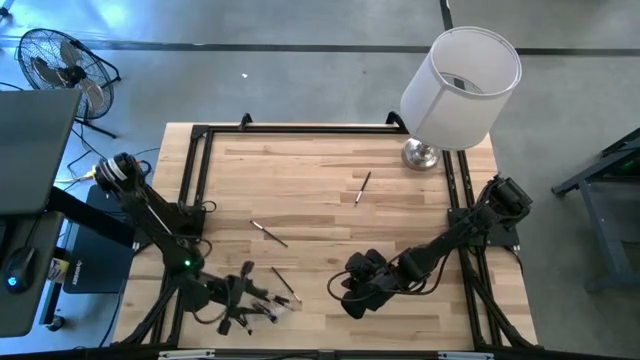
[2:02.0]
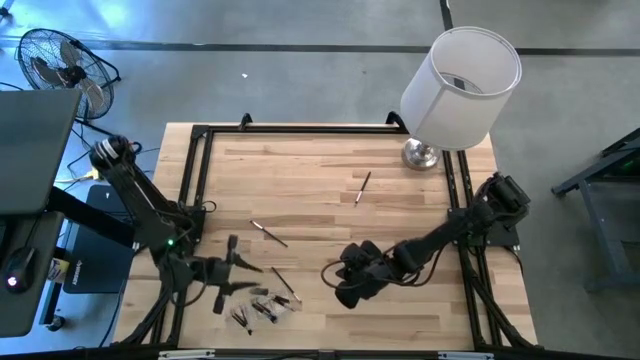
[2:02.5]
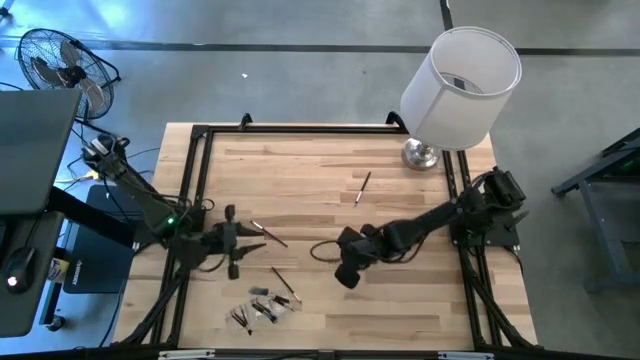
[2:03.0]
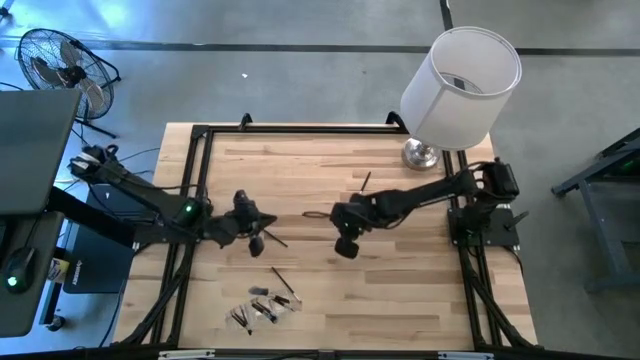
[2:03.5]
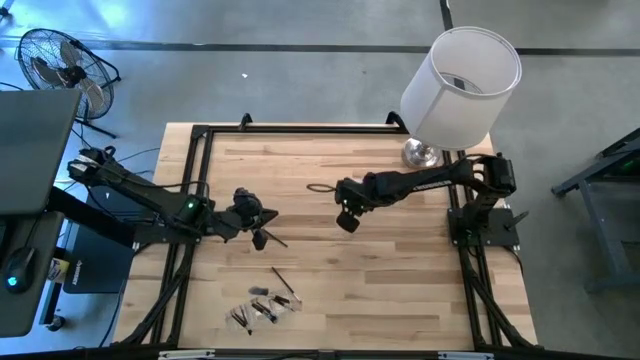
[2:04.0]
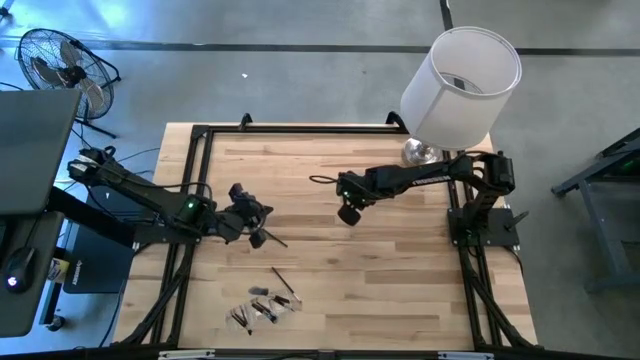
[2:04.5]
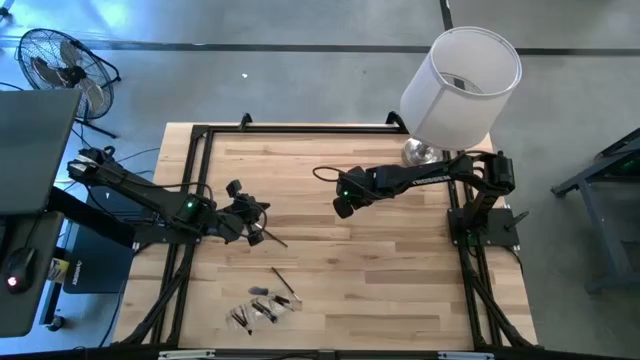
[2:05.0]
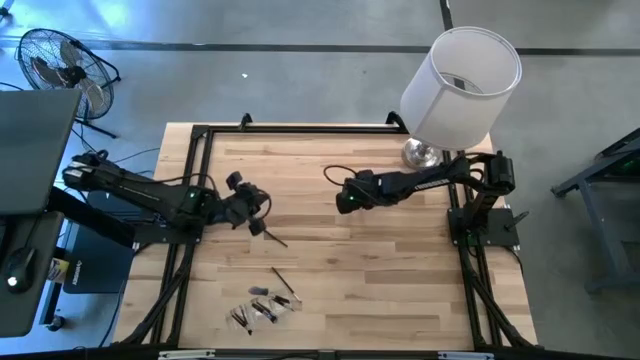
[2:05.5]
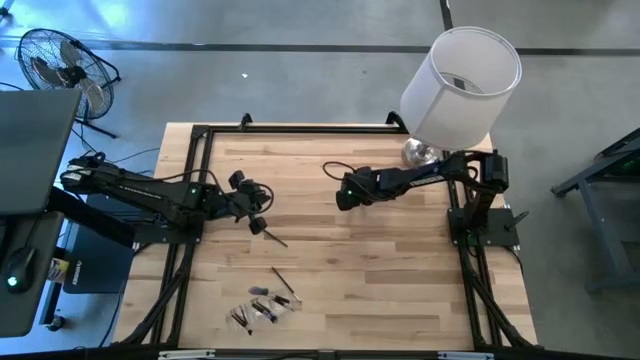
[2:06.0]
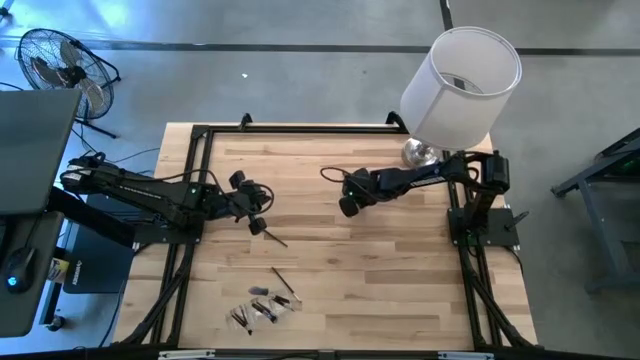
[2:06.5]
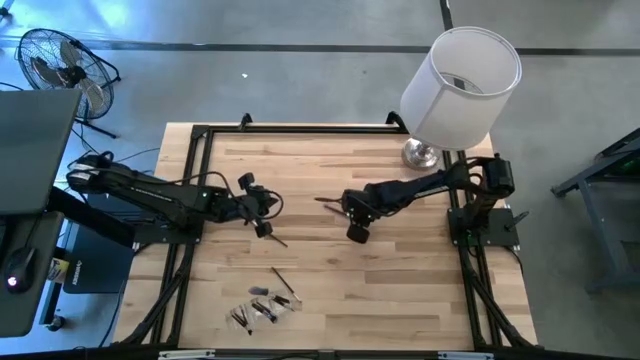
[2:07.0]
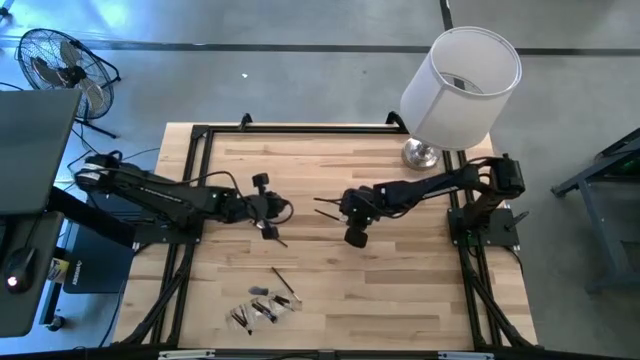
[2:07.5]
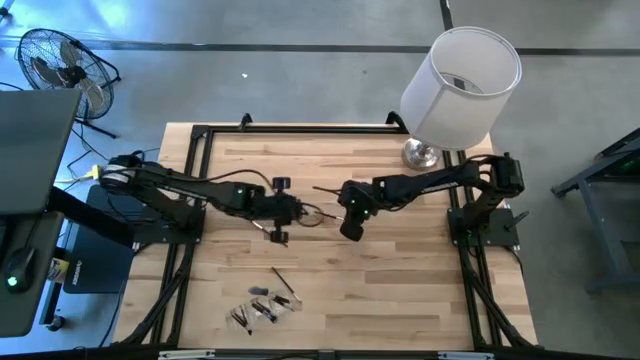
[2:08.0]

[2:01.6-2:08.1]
Task: Pick & Place Makeup Supplies
Put the silver makeup brush into the transparent organizer

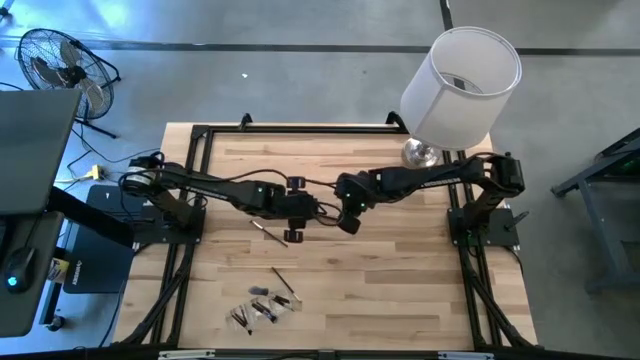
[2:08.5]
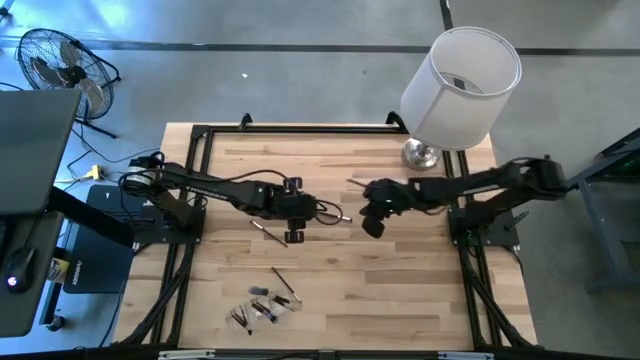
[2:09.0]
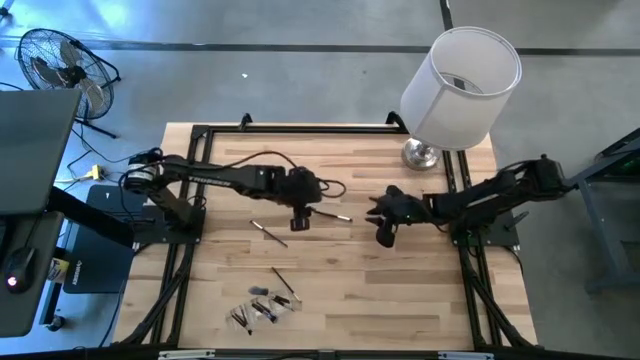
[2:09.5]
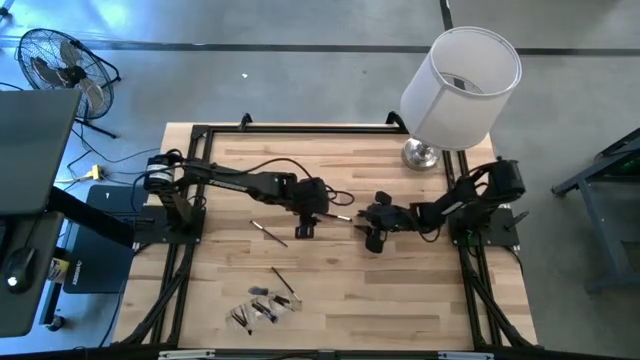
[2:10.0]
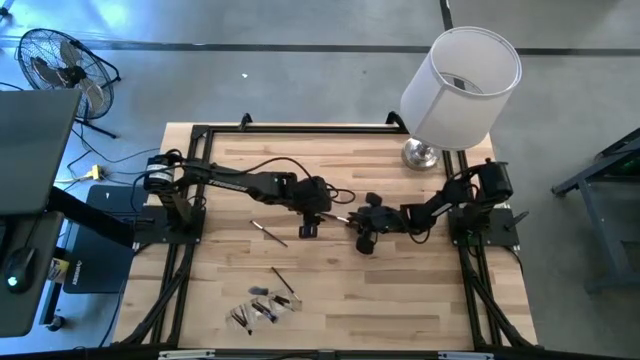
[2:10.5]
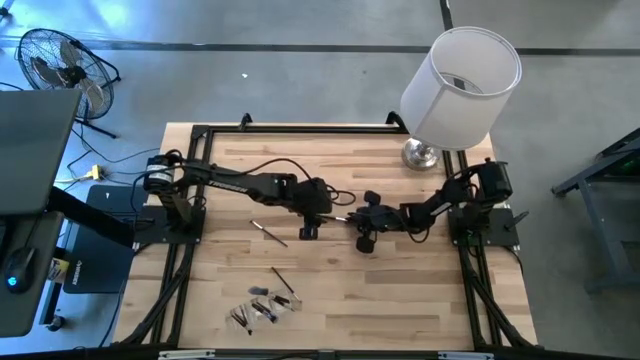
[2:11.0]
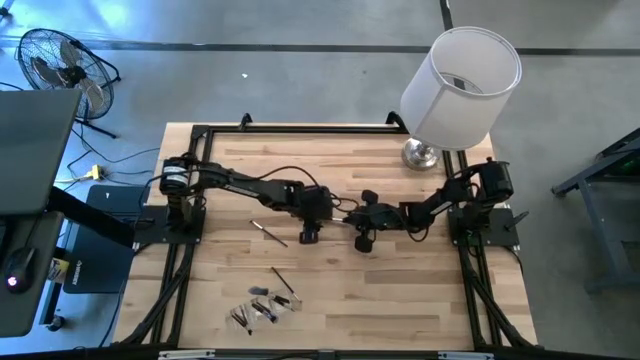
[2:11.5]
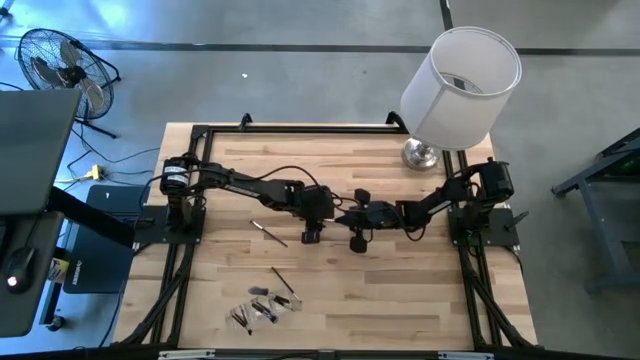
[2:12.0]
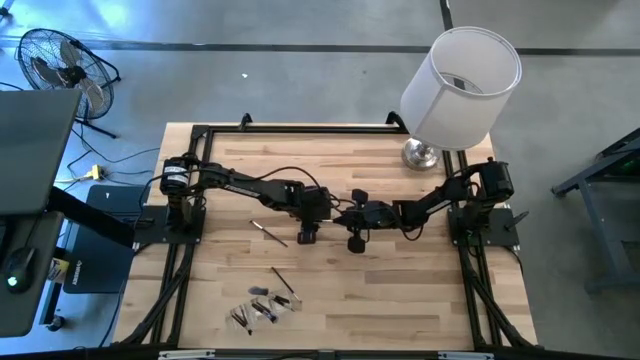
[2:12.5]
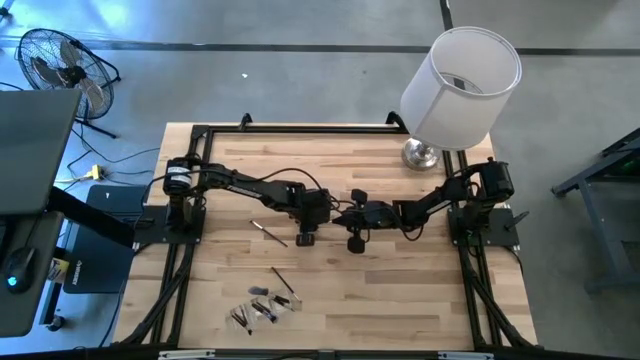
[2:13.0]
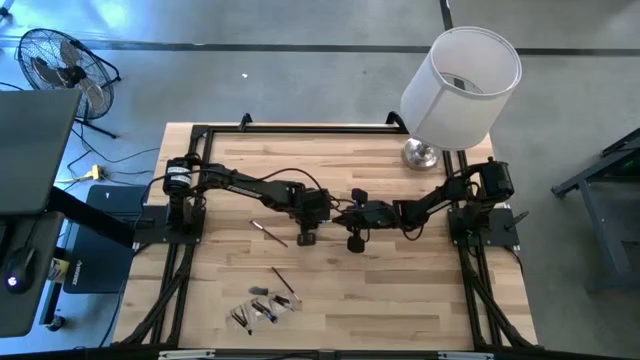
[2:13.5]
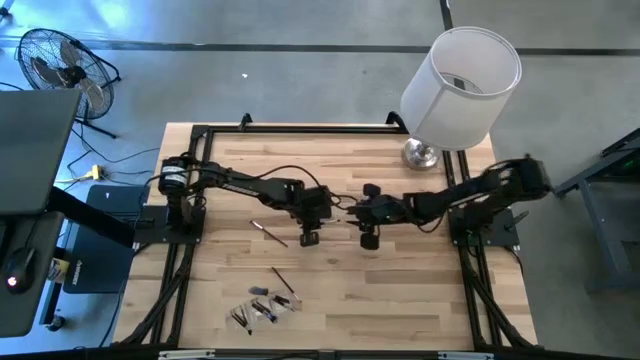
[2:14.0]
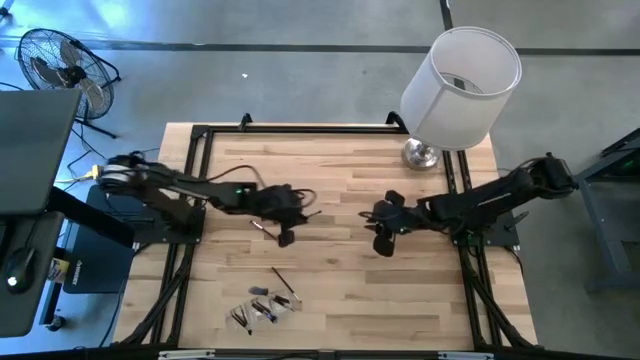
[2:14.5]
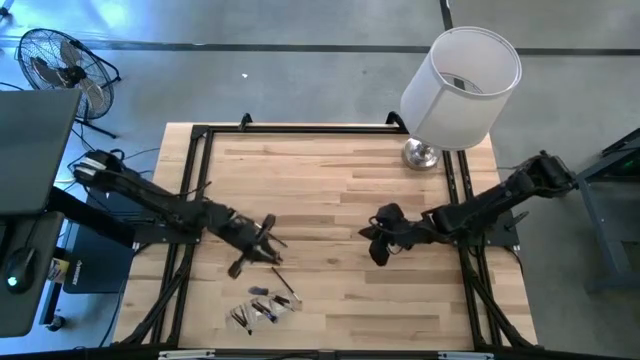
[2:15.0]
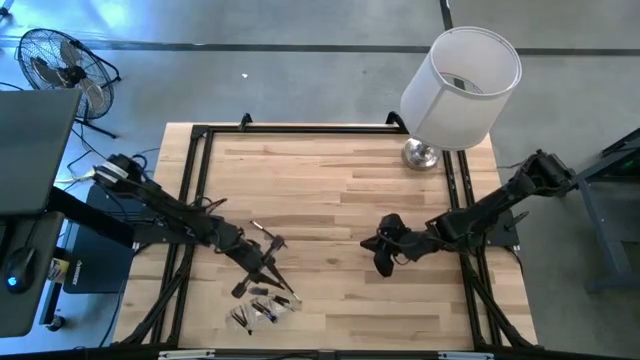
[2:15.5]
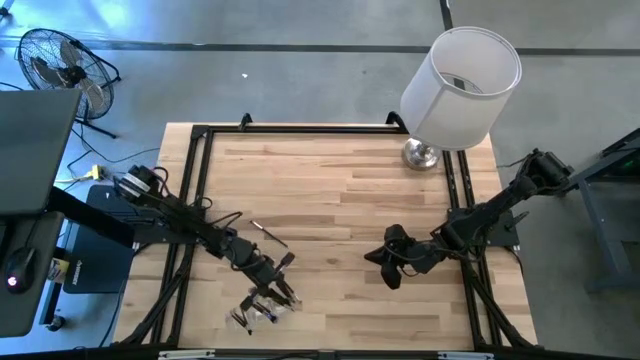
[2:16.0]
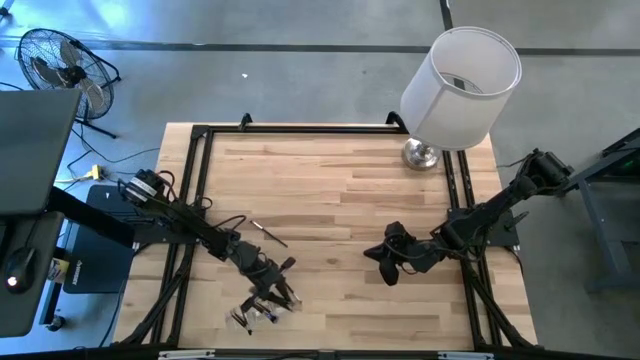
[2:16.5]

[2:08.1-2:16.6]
Put the silver makeup brush into the transparent organizer

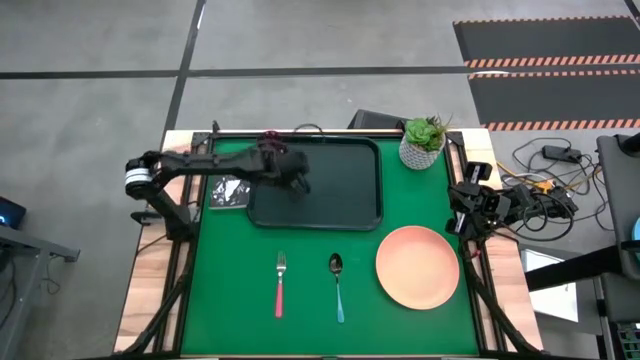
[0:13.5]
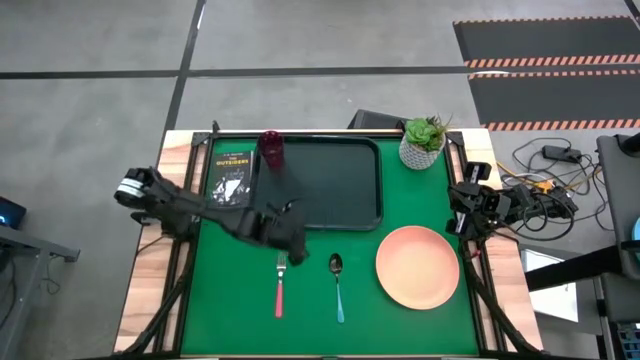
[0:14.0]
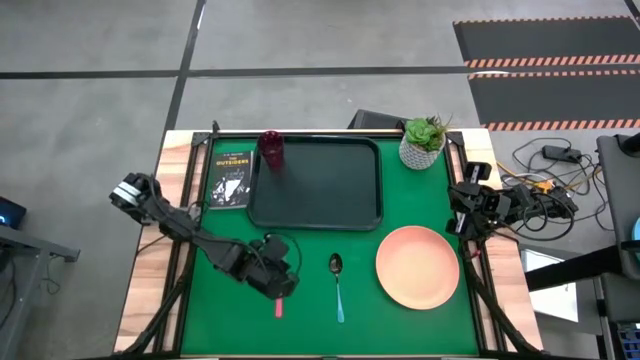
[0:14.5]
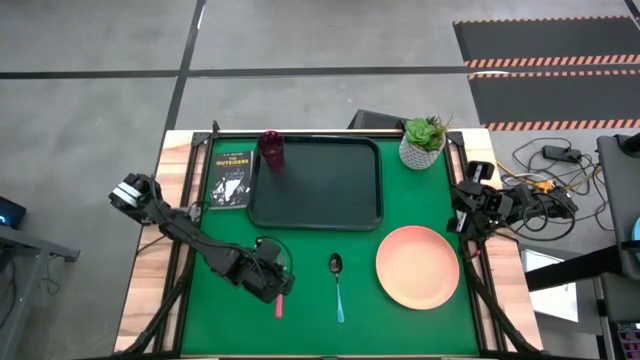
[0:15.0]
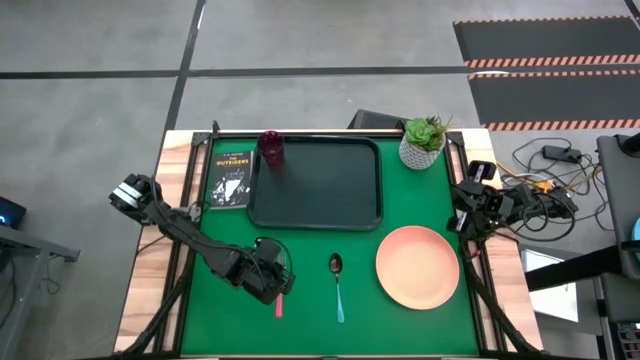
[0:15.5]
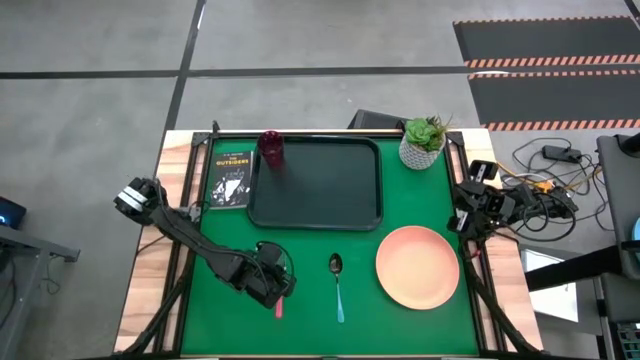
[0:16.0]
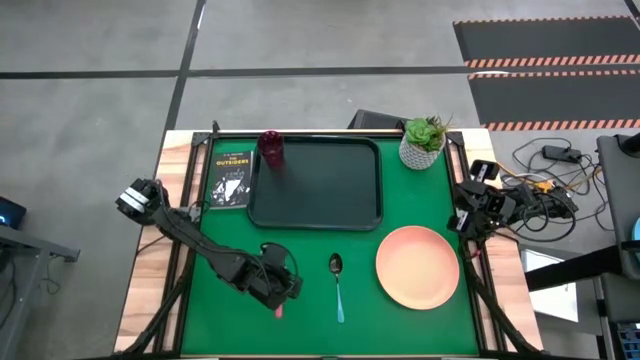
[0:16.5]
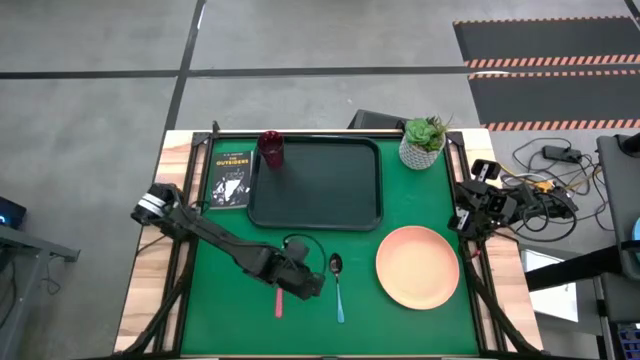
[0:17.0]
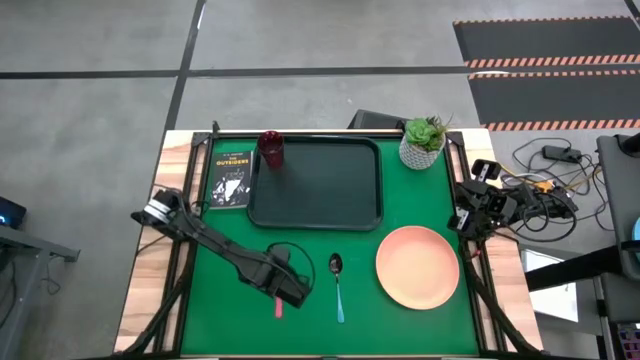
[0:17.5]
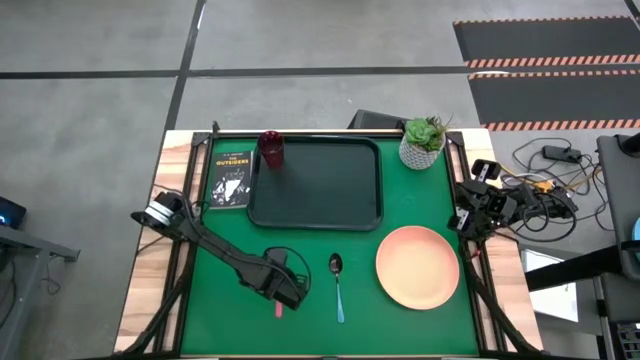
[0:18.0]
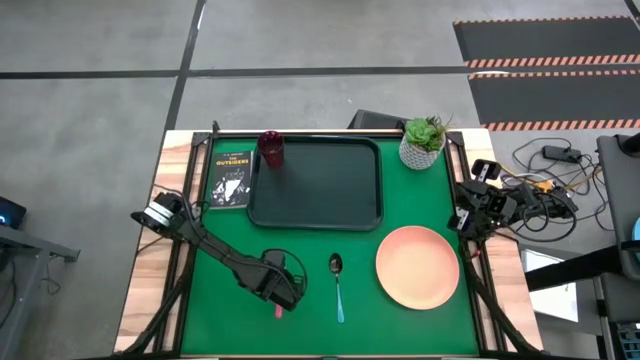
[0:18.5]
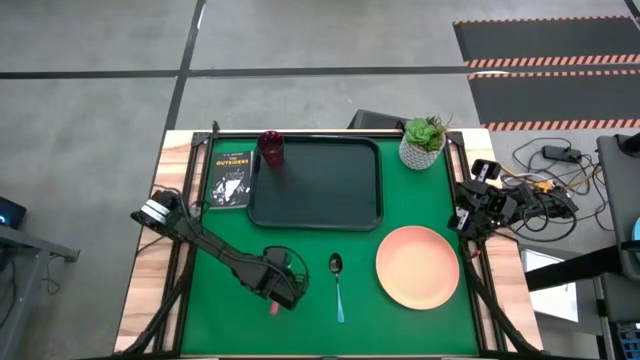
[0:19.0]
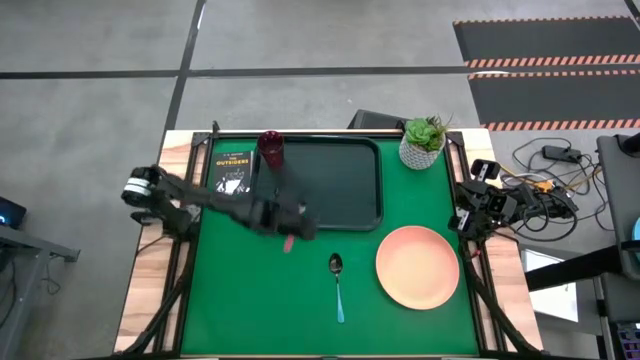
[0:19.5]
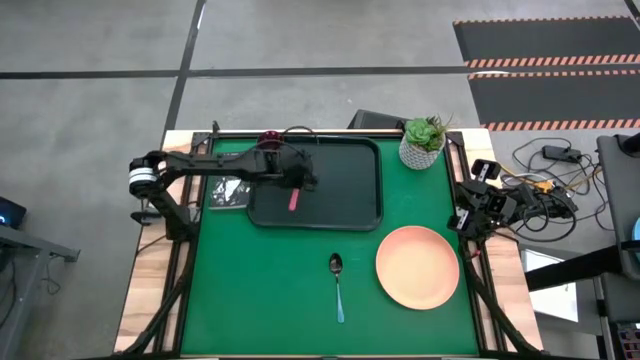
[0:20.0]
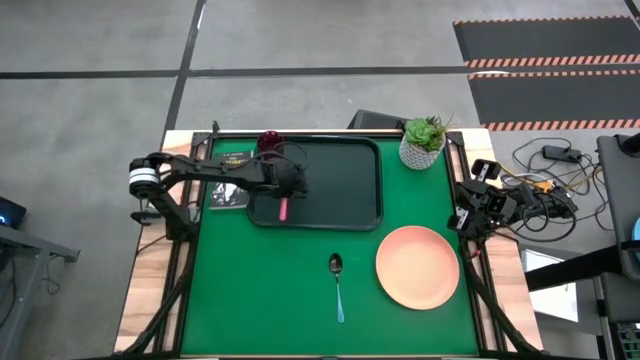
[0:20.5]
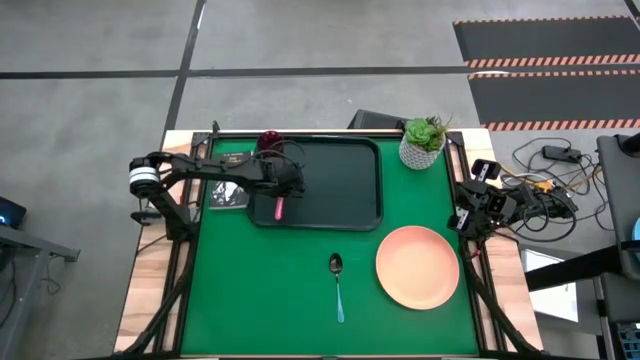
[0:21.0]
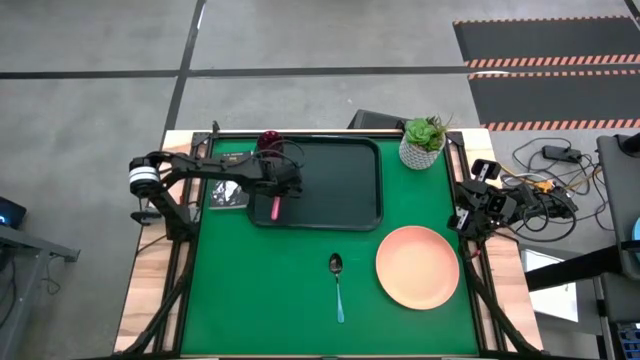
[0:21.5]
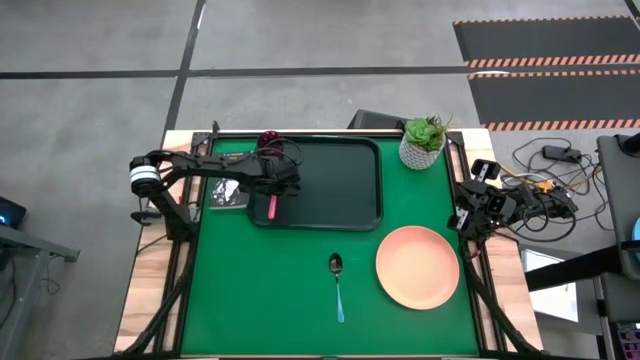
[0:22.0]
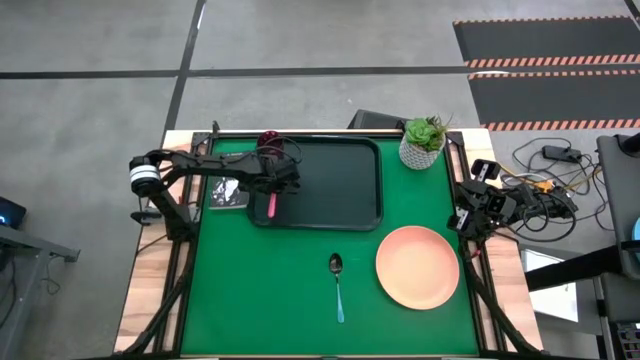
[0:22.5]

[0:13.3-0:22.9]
Task: Pick and place plate/cup/fork/spoon on tray
Put the pink fork at the bottom of the red cup on the black tray
